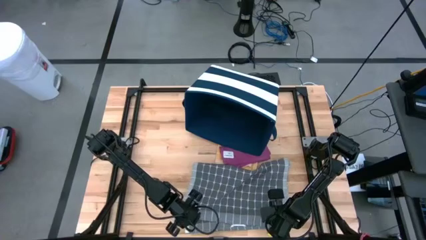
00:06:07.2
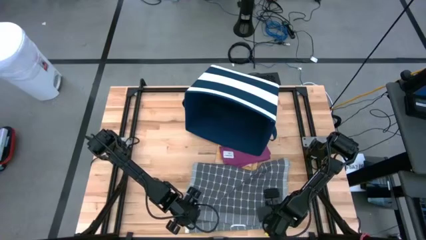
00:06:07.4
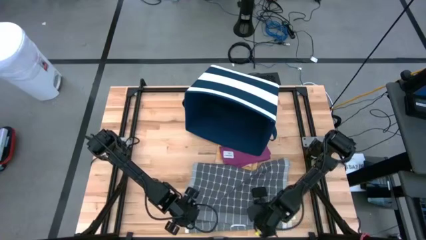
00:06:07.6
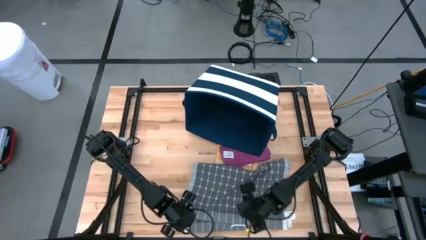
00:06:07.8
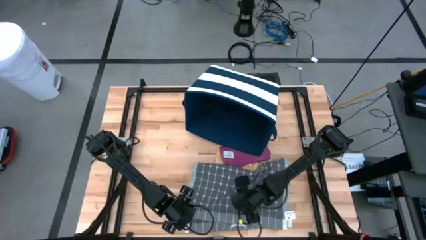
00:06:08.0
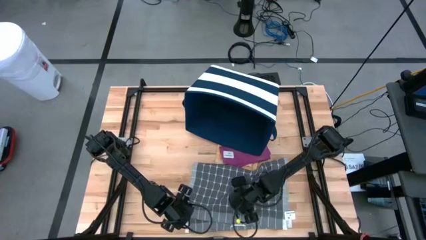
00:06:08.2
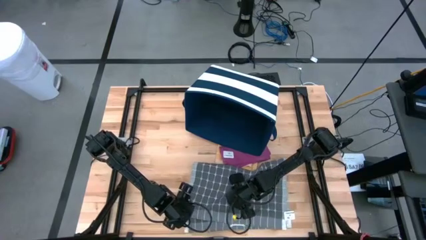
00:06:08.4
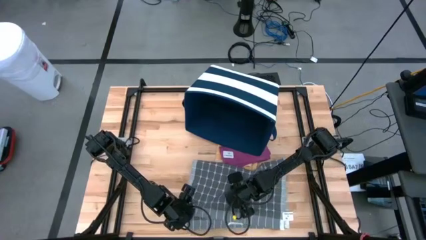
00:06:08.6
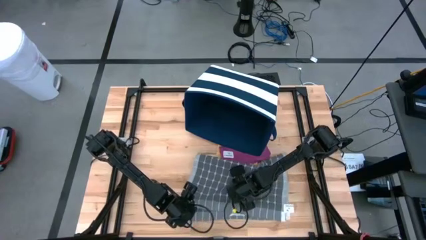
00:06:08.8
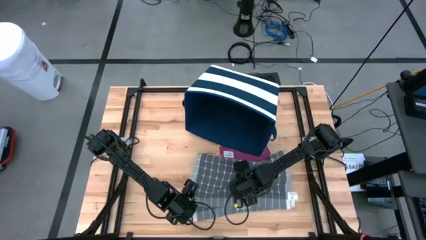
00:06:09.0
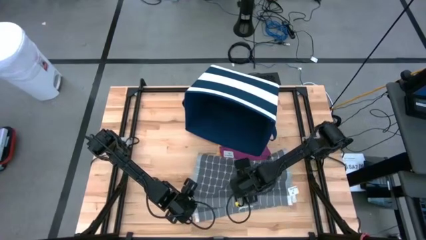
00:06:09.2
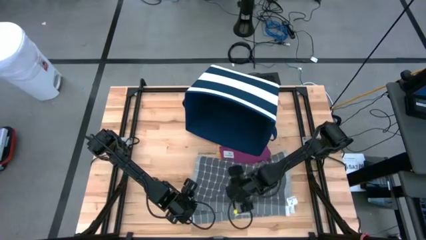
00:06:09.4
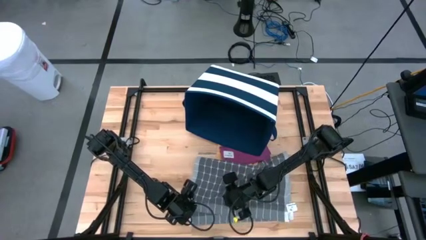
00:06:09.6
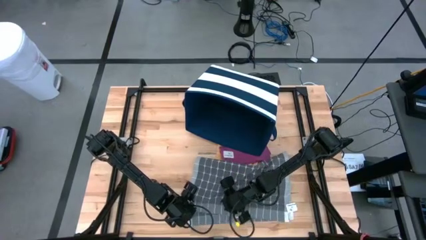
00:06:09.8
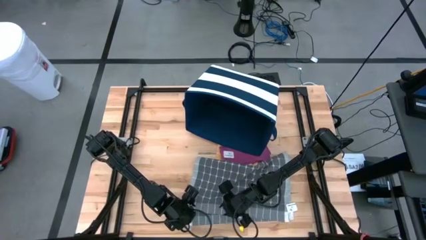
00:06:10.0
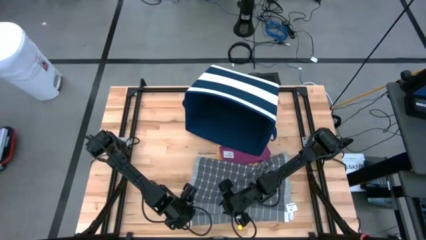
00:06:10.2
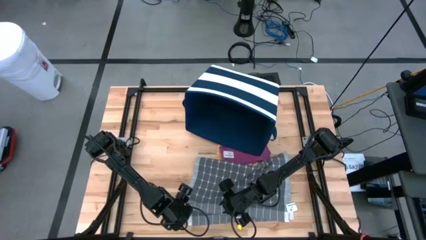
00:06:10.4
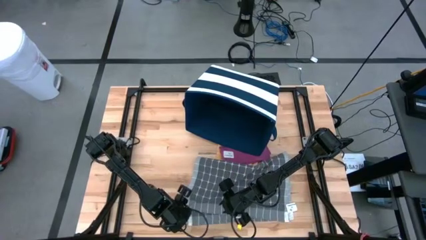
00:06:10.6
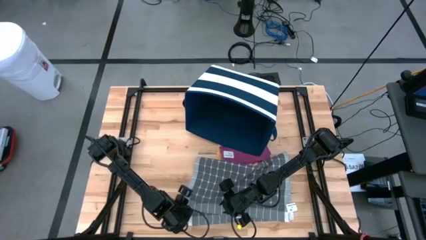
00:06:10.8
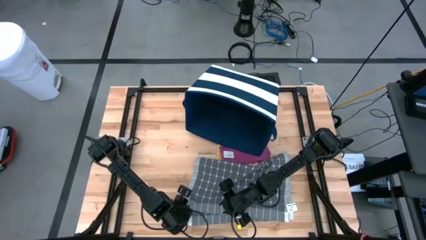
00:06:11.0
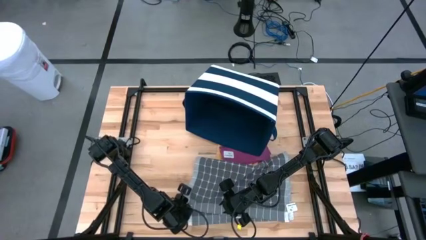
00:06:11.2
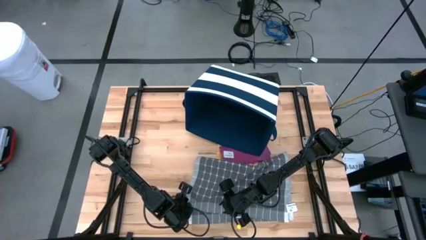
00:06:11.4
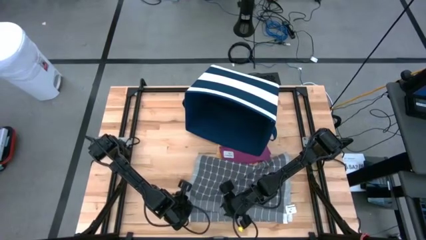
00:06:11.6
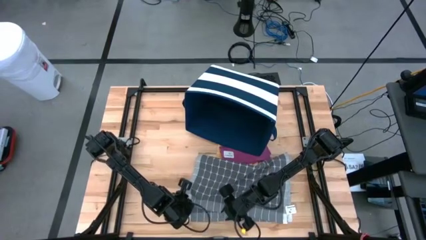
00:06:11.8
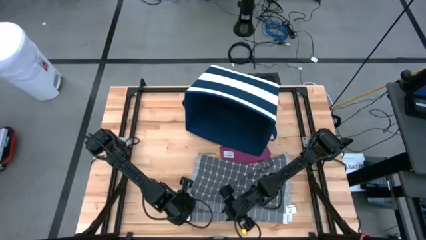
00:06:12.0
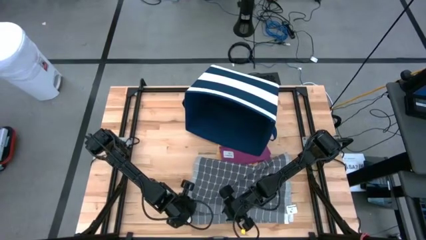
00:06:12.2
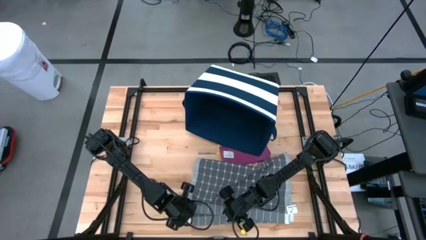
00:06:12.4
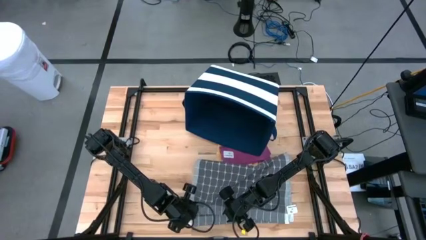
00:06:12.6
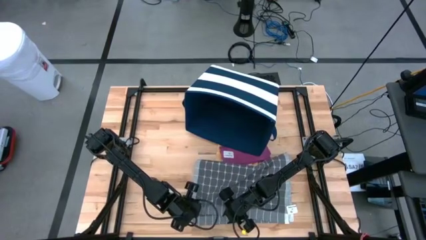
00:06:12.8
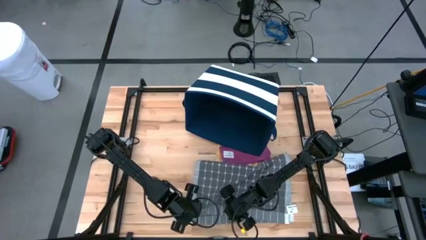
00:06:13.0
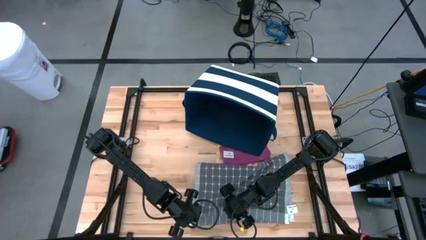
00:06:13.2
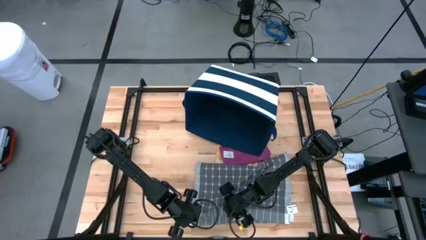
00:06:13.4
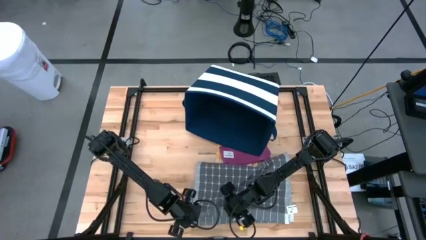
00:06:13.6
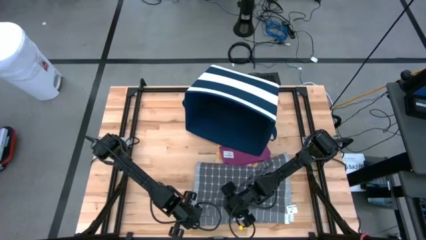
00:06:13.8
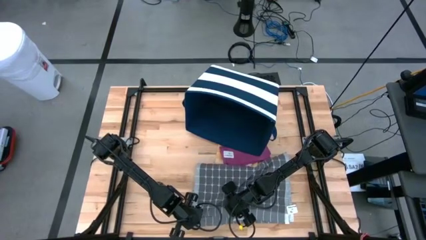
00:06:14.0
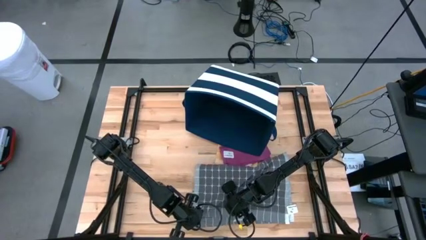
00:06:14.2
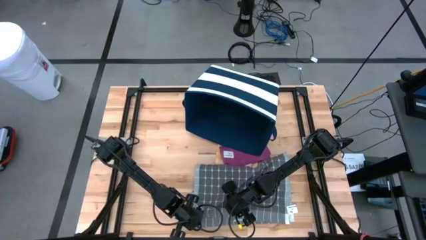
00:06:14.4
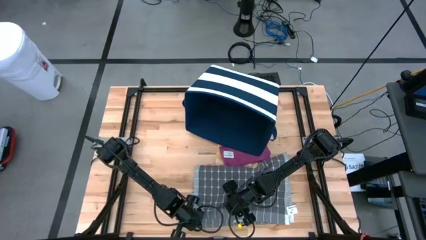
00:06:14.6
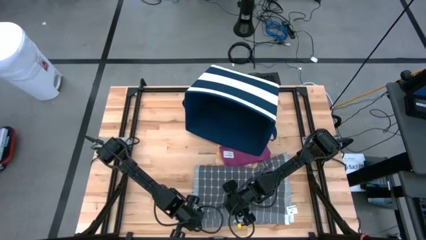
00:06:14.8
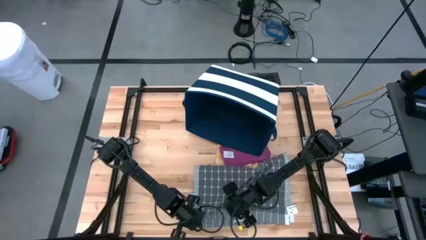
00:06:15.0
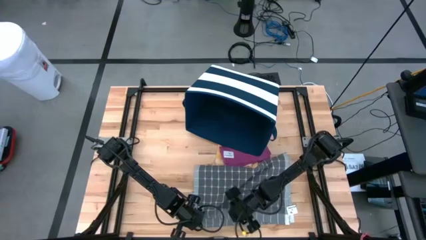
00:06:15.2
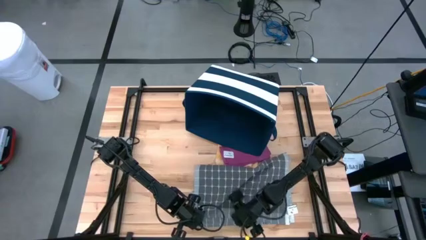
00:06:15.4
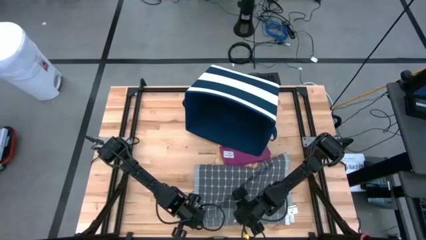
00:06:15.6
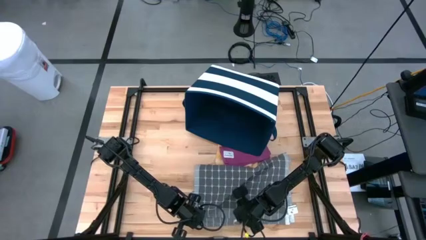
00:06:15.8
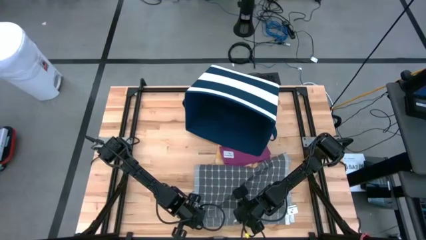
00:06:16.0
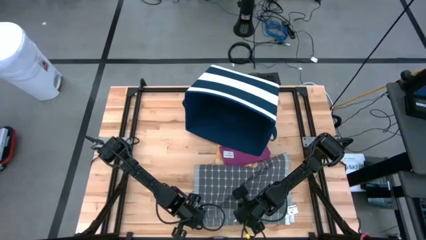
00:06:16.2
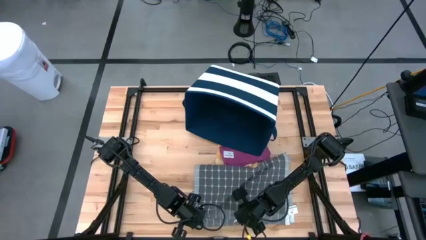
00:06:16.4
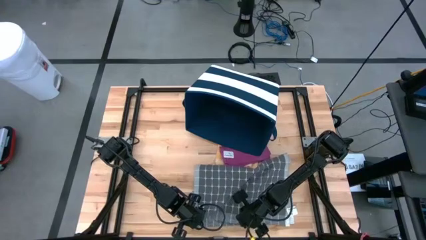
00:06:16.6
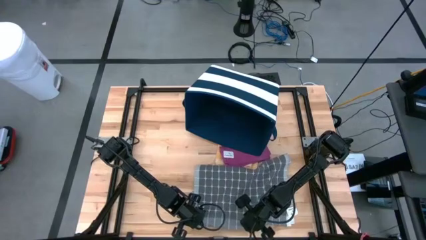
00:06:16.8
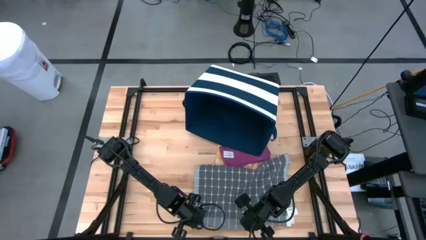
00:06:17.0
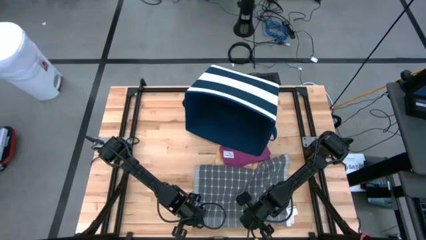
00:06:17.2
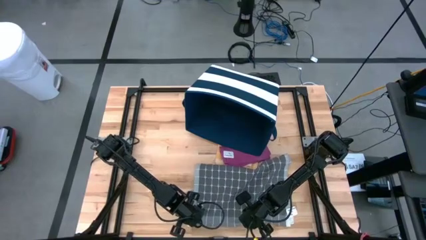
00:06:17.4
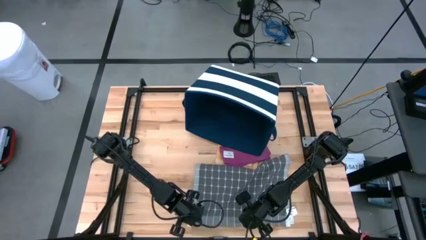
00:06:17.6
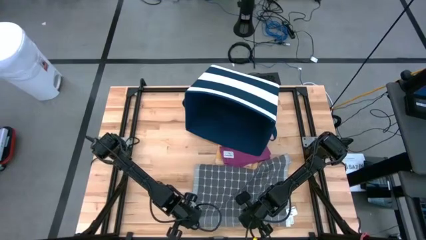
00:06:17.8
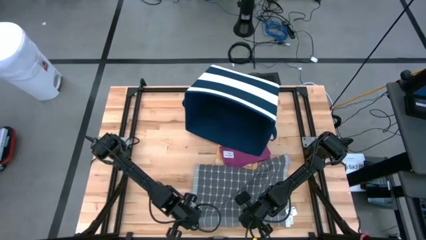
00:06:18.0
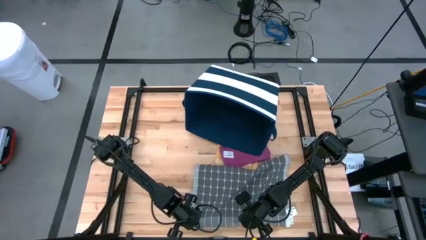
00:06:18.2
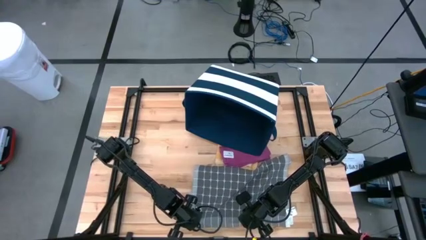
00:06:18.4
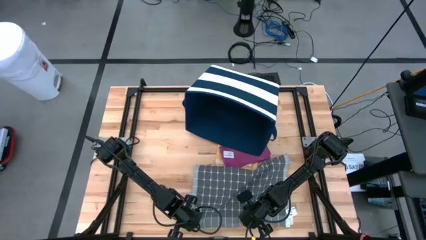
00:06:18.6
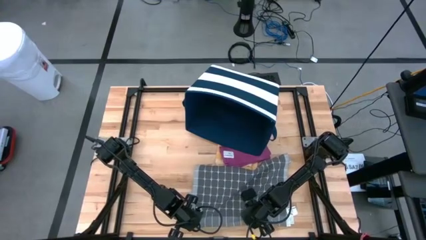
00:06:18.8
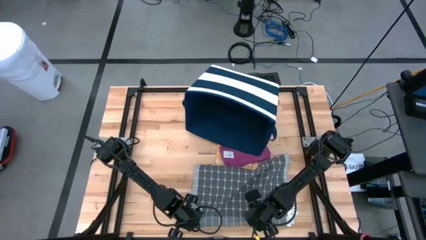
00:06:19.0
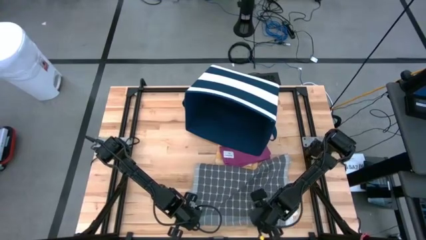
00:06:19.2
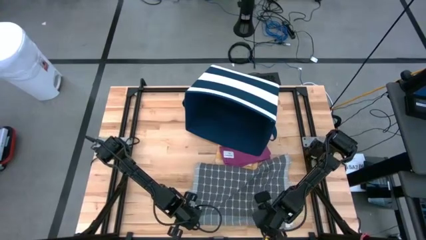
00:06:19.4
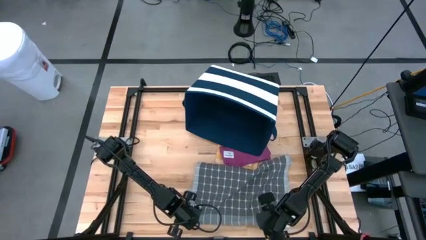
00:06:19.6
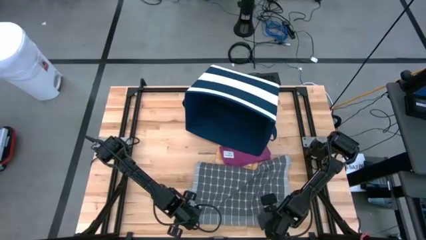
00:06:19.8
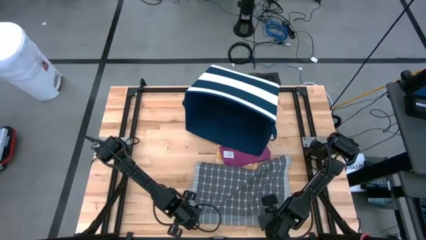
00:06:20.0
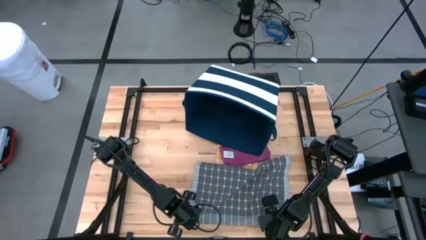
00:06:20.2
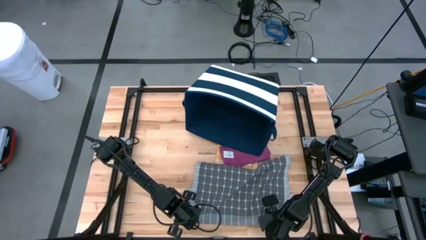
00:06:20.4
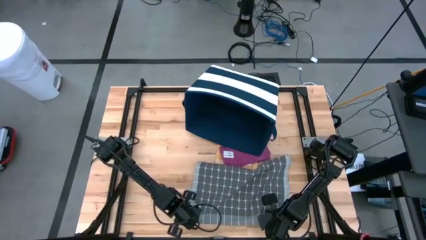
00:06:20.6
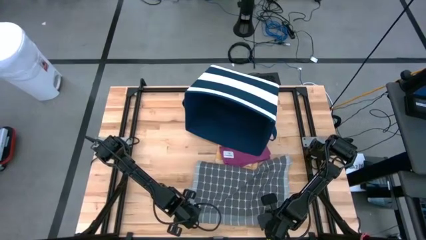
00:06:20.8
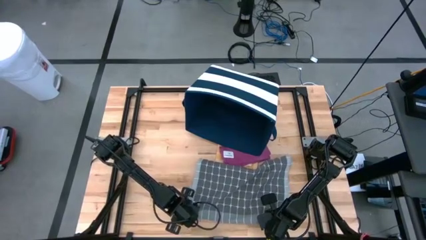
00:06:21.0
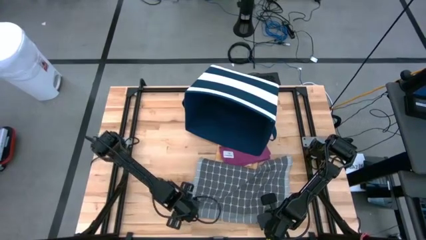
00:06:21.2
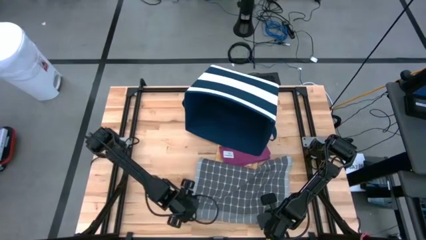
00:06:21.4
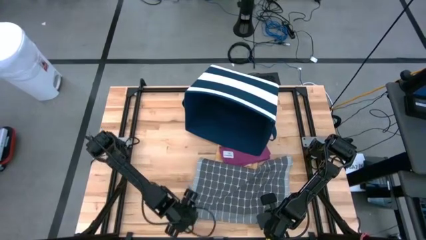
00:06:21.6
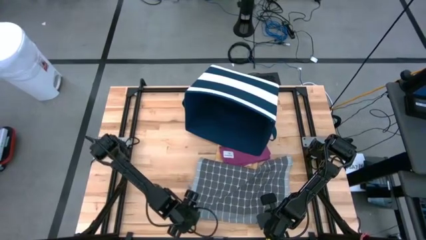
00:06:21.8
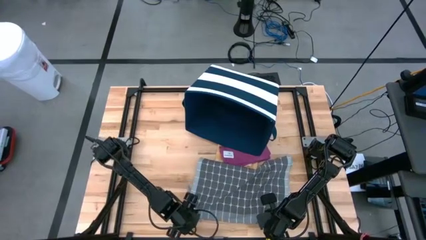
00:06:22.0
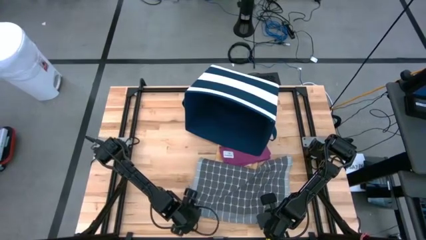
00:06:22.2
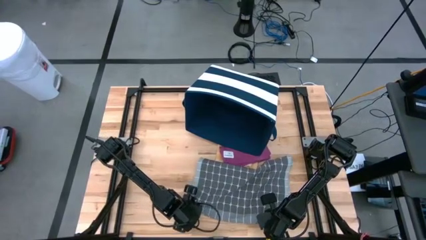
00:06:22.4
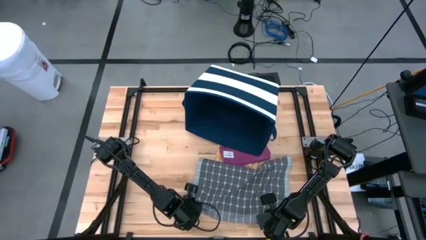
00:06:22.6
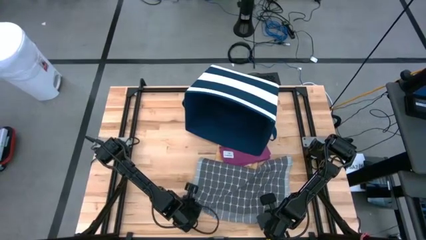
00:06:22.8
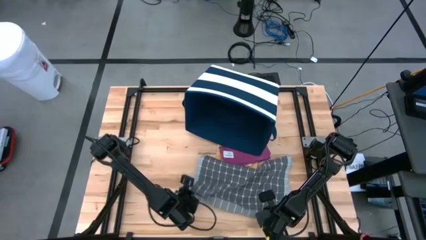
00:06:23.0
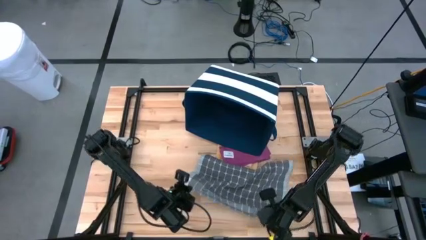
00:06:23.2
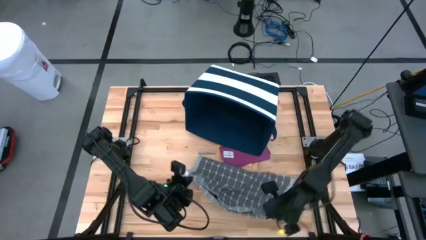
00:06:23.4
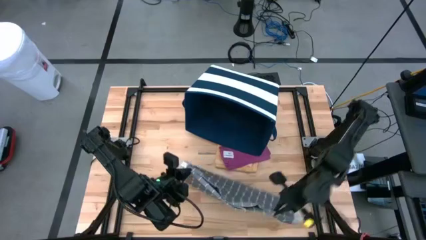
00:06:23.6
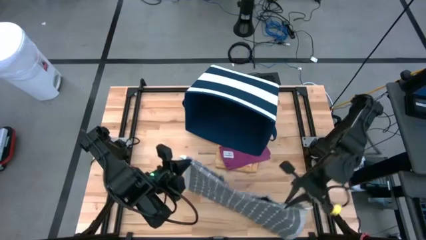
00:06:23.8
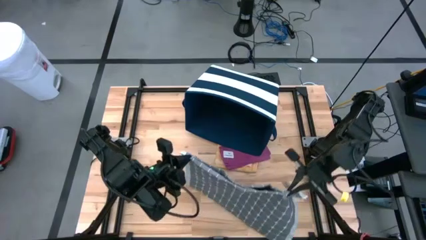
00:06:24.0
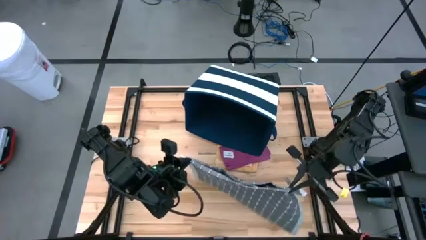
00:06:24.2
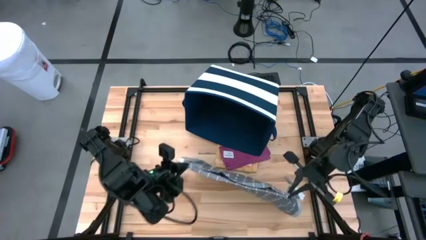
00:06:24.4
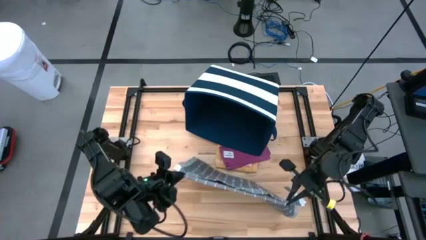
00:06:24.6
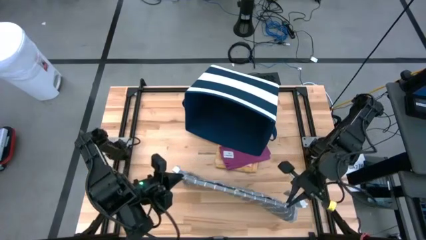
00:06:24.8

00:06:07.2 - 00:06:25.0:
Task: Fold towel
Fold the gray towel
